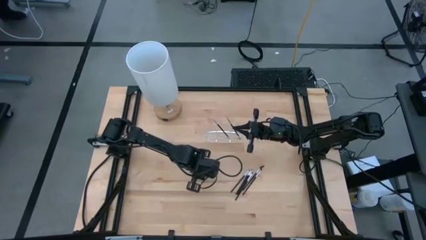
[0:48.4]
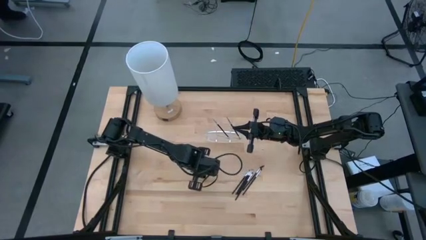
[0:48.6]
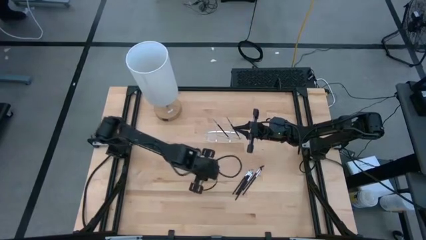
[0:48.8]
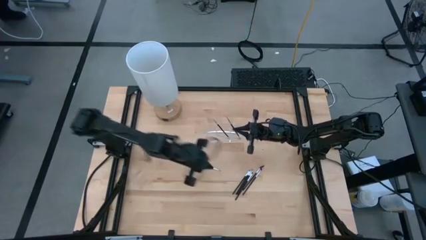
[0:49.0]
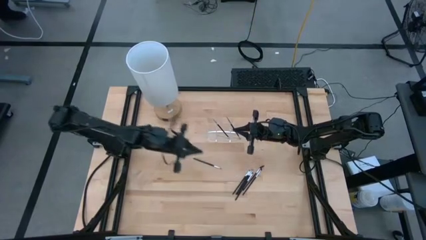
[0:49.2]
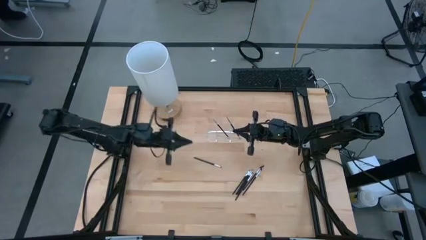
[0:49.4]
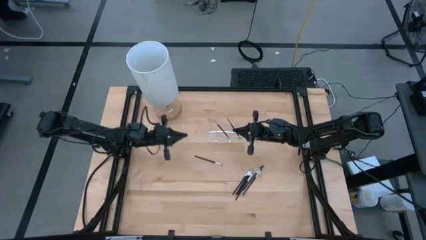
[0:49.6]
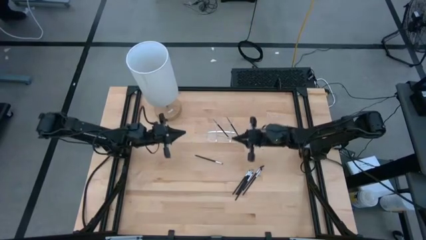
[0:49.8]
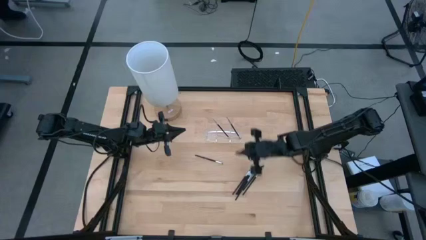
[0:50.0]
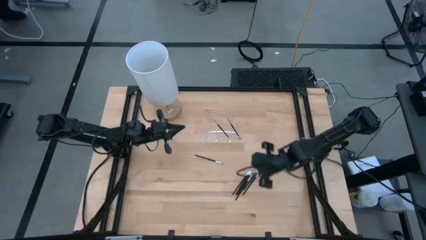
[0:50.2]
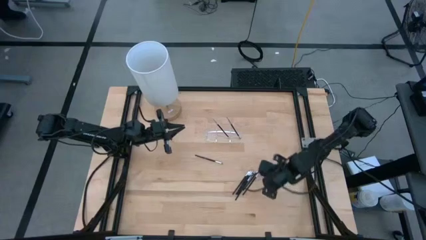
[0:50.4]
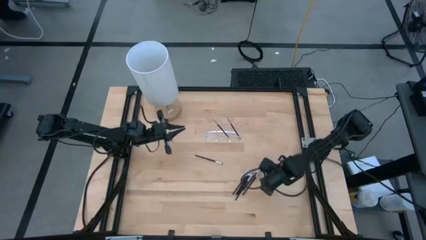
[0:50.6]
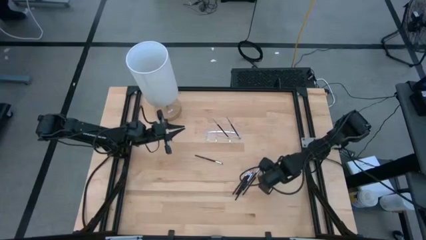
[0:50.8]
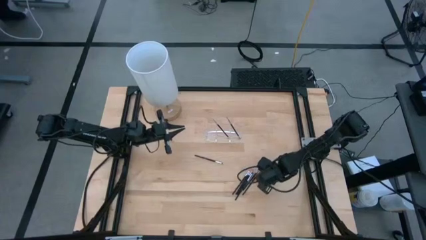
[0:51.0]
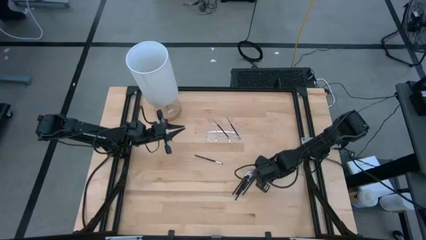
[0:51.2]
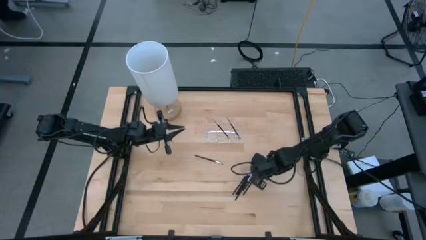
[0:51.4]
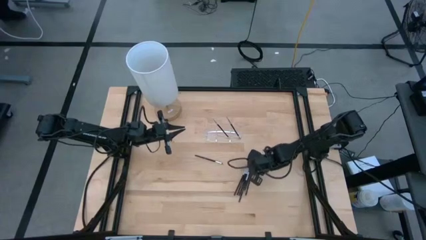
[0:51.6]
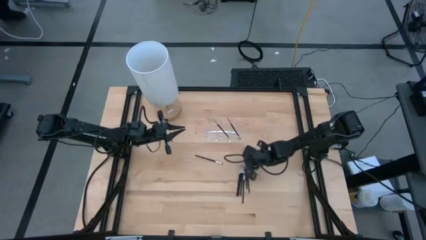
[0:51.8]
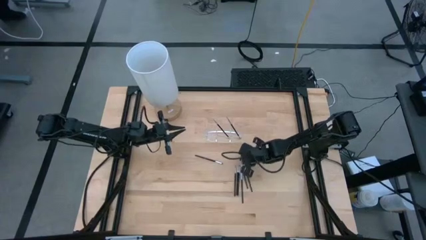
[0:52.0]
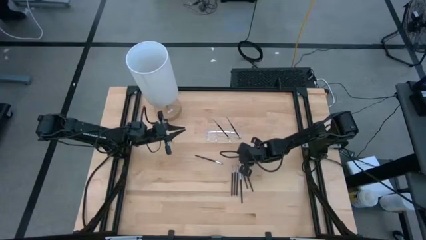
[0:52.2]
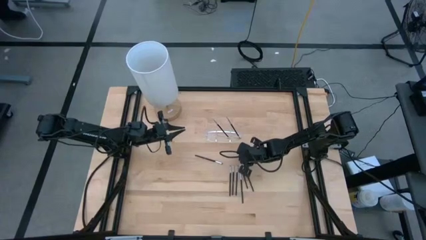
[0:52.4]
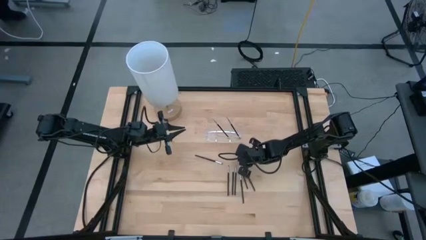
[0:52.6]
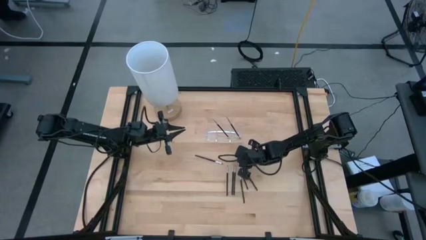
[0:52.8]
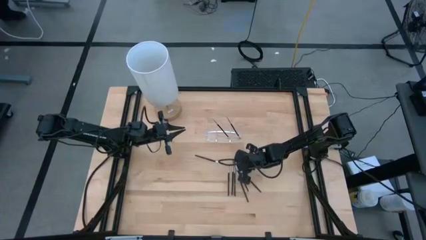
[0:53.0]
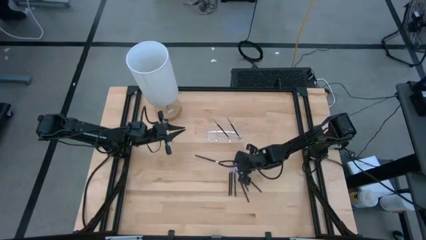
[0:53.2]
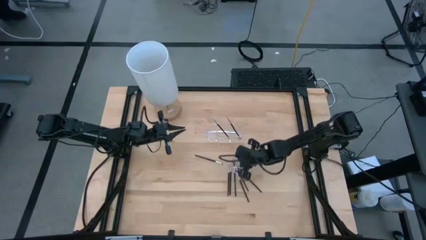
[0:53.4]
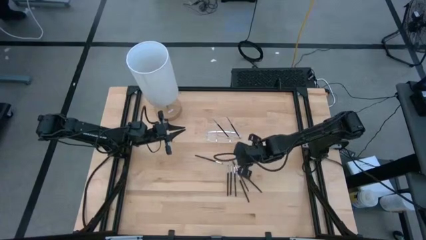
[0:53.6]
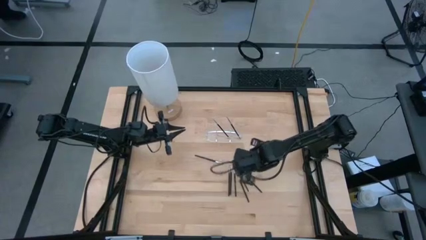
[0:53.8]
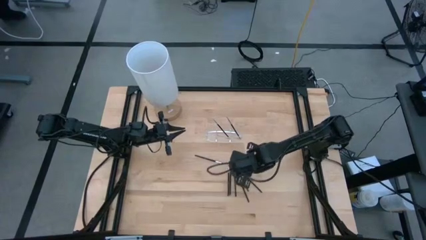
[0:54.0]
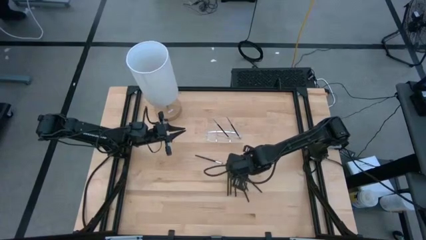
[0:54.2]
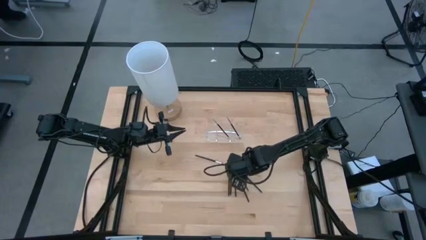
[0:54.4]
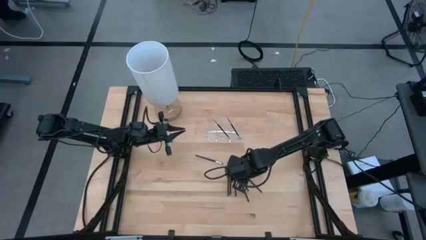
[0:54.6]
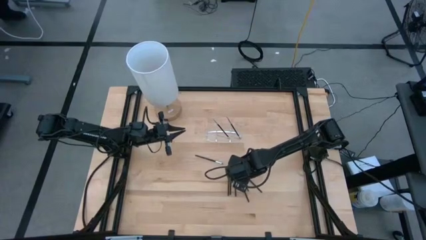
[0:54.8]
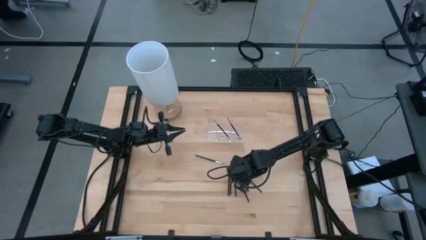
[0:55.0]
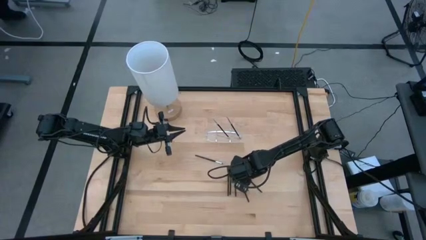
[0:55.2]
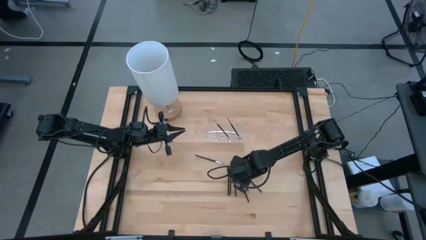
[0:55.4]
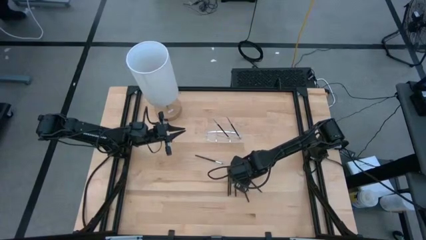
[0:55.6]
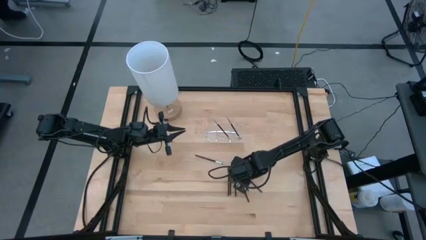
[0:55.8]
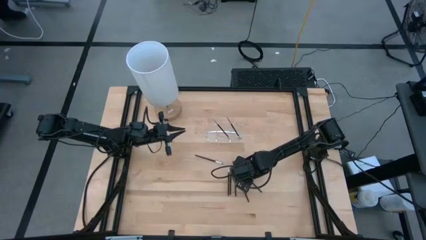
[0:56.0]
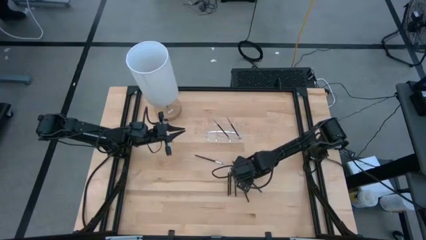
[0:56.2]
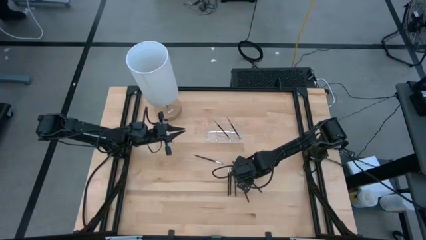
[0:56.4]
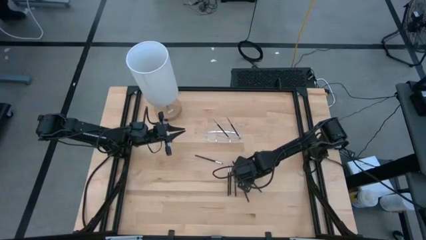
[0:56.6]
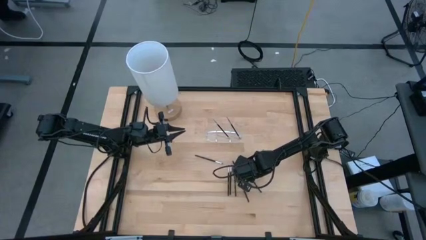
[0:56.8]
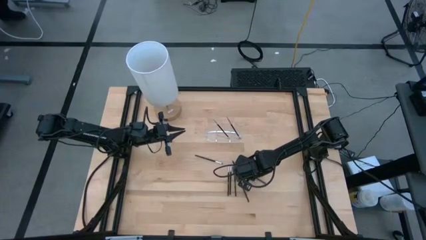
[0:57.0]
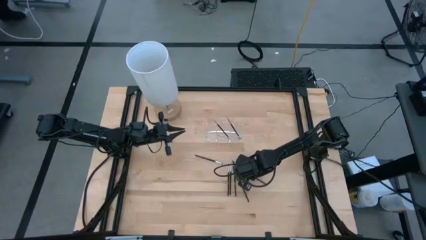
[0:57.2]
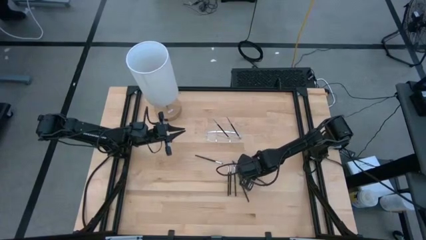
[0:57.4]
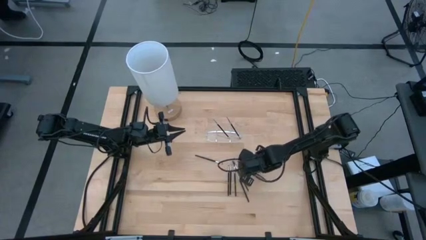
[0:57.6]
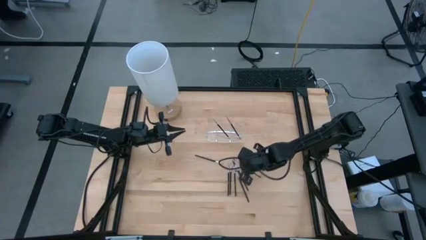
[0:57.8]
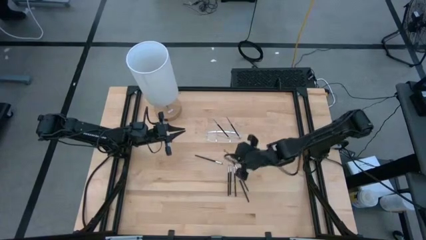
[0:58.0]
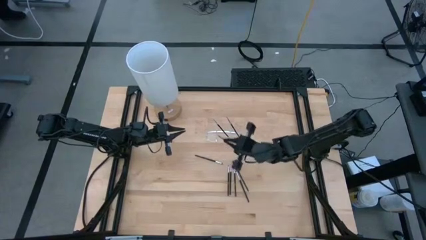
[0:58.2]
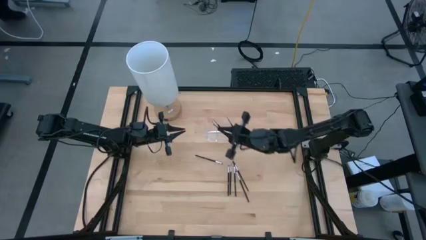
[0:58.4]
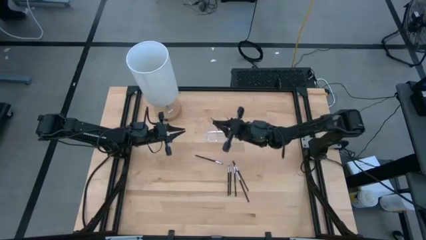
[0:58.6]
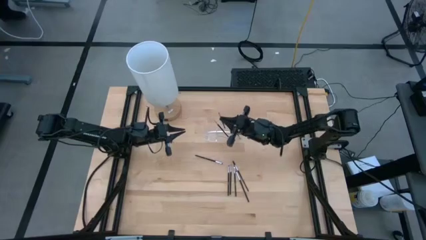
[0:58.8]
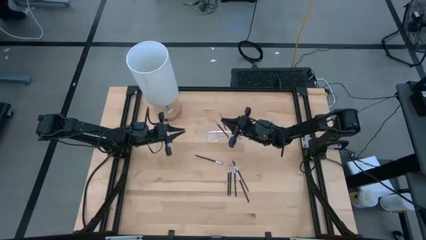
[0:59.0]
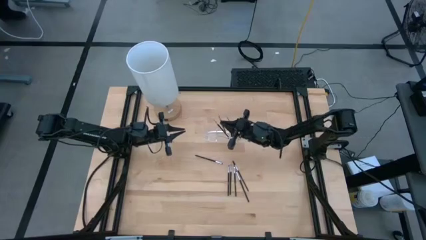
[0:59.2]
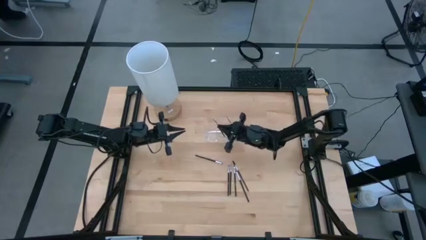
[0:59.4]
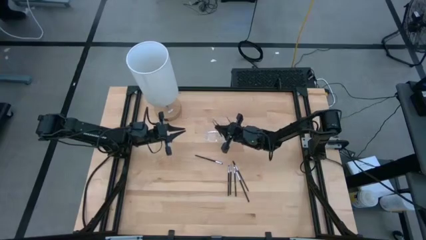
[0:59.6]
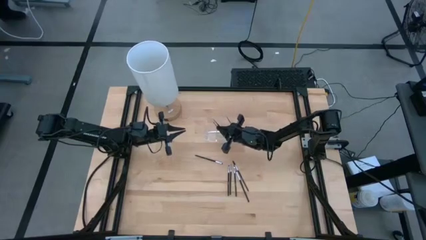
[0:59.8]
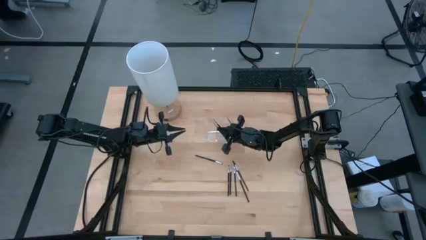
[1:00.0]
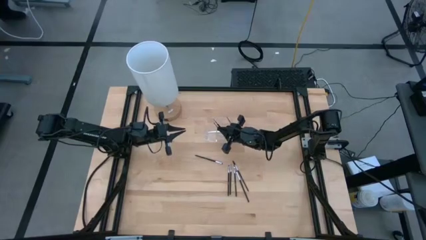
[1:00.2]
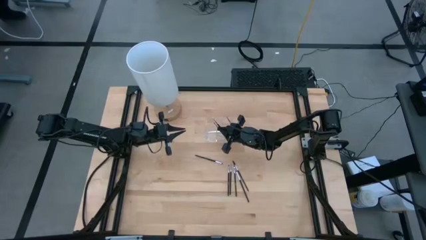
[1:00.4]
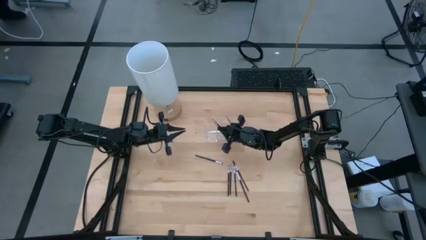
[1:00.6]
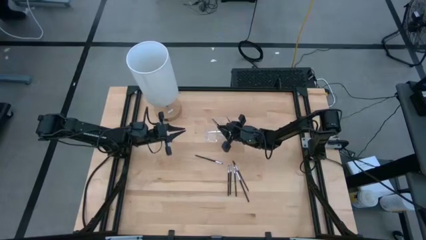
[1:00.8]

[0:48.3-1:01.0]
Task: Put items in baskets/containers
Put the black eyeshadow brush into the transparent organizer

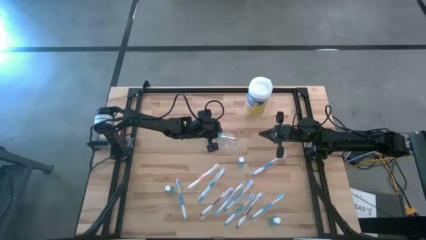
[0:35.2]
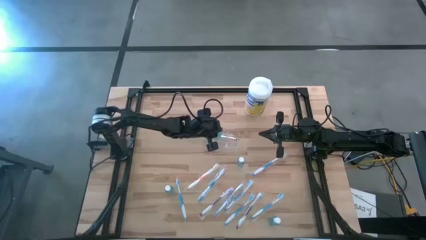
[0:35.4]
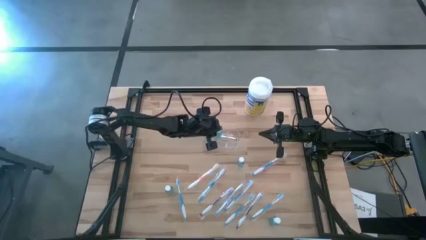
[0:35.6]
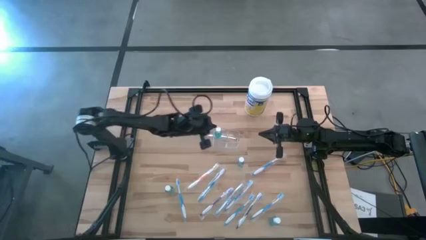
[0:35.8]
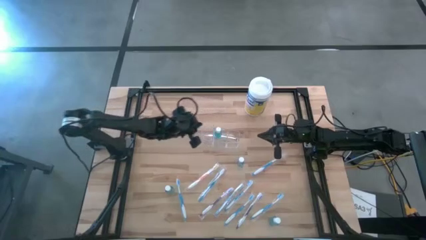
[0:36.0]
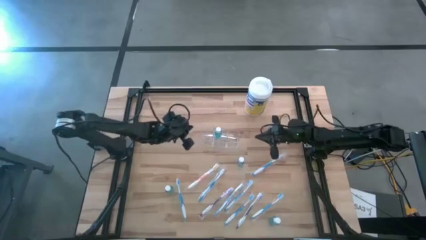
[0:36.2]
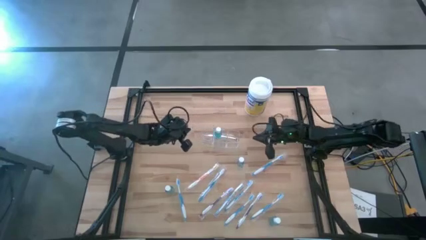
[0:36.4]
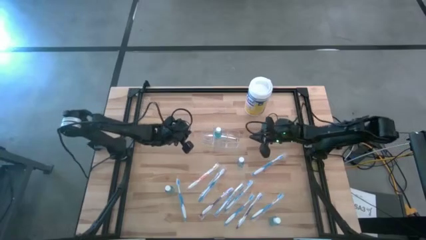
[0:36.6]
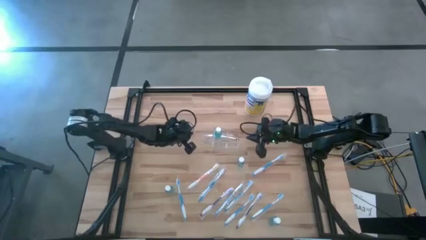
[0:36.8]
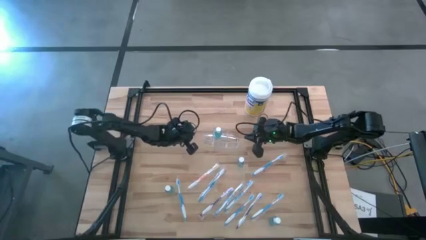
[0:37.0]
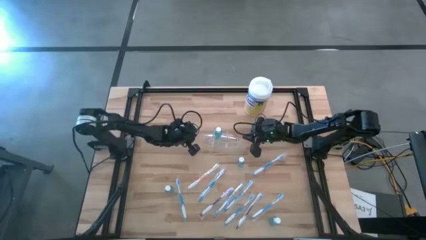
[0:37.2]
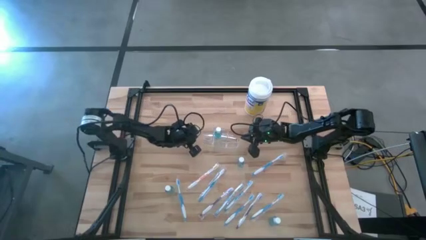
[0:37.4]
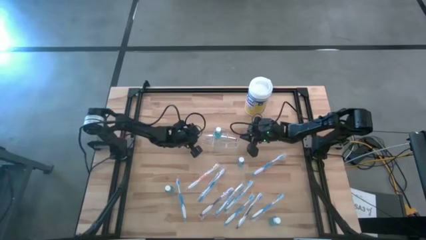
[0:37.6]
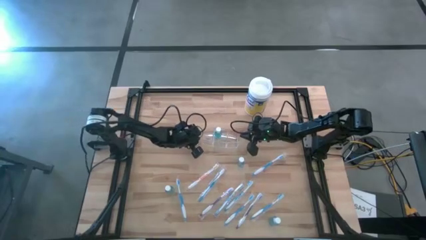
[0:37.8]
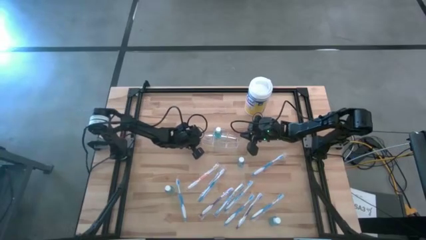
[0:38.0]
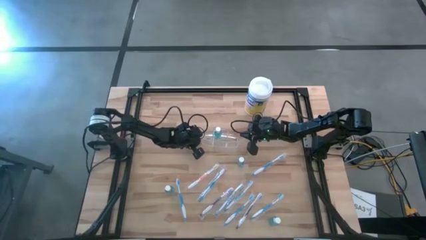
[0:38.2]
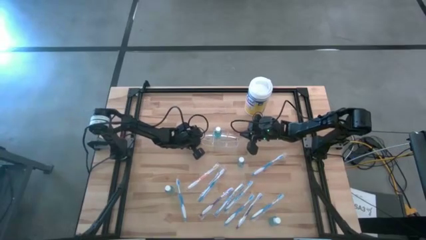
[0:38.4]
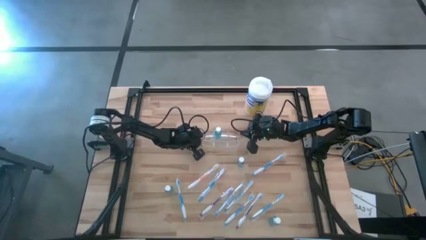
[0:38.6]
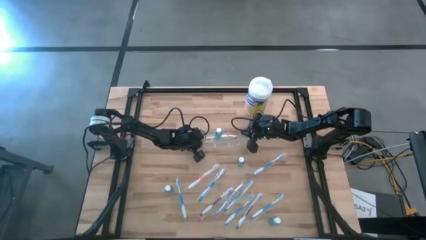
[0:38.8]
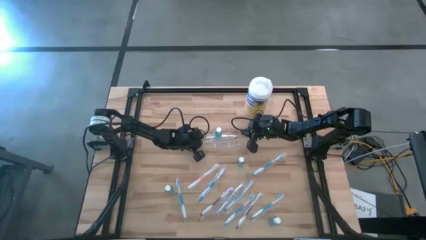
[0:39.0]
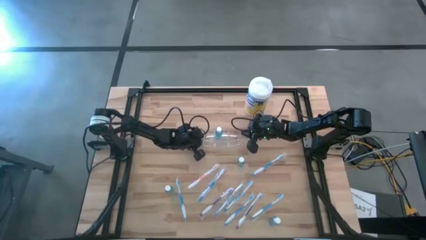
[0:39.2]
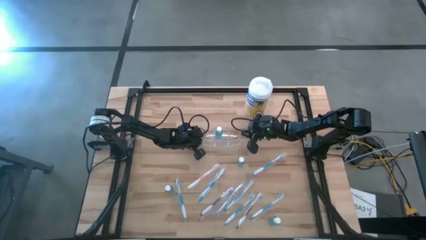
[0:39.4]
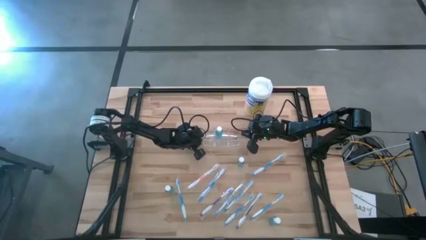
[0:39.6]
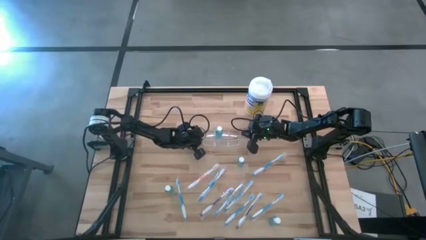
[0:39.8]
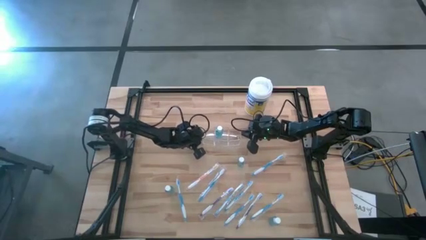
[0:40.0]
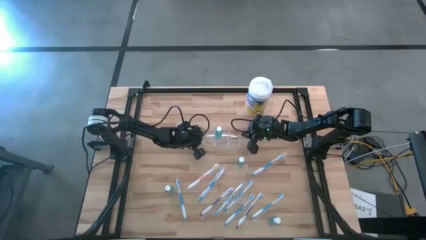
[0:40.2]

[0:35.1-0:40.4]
Task: Pick & Place toothbrushing station
Adjust the transparent organizer
